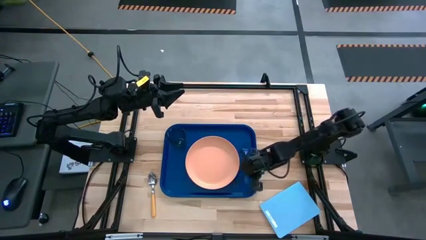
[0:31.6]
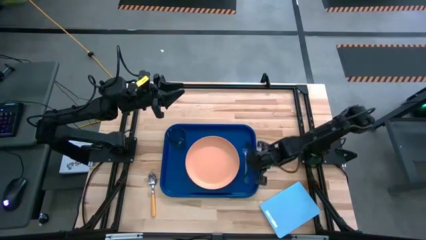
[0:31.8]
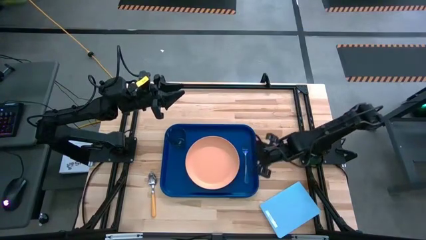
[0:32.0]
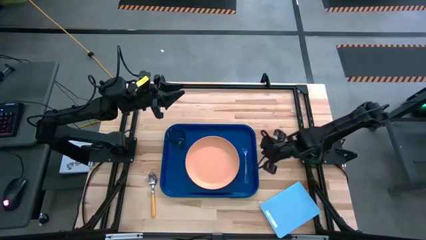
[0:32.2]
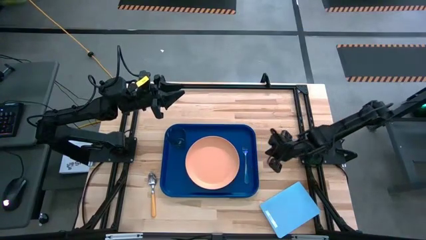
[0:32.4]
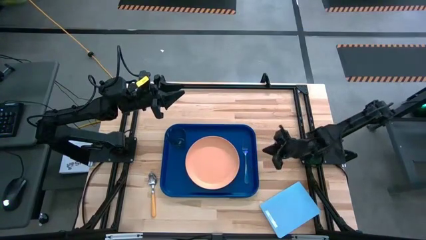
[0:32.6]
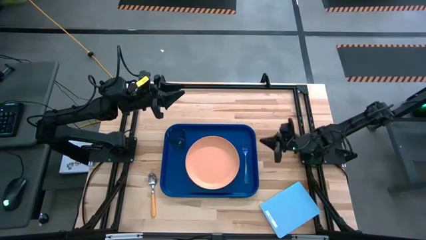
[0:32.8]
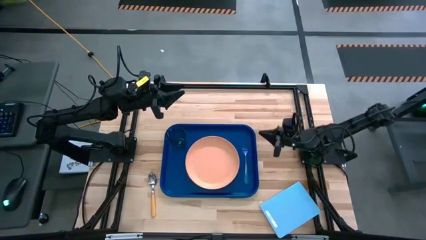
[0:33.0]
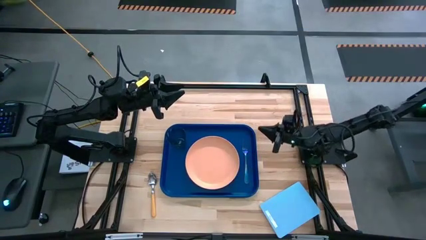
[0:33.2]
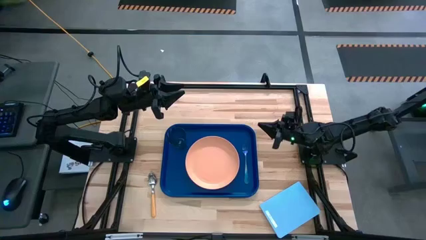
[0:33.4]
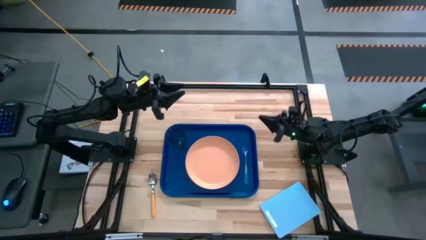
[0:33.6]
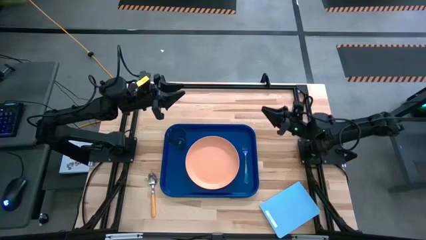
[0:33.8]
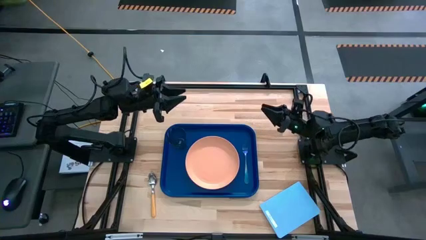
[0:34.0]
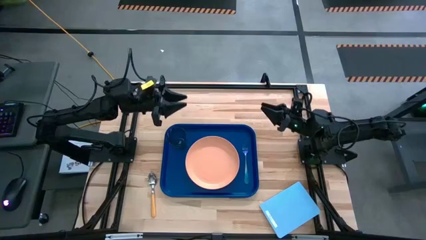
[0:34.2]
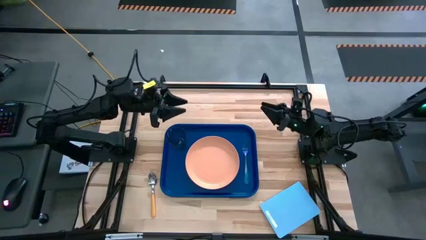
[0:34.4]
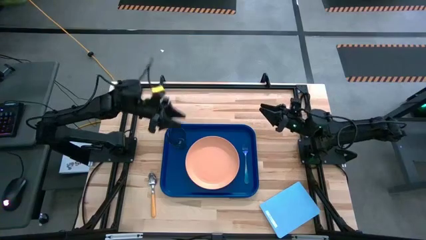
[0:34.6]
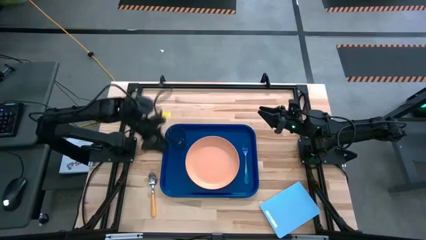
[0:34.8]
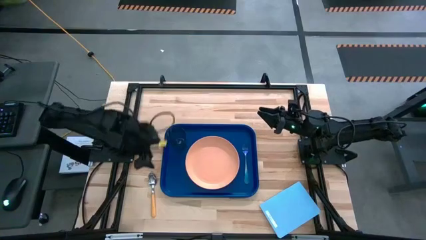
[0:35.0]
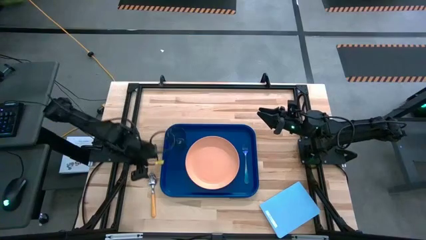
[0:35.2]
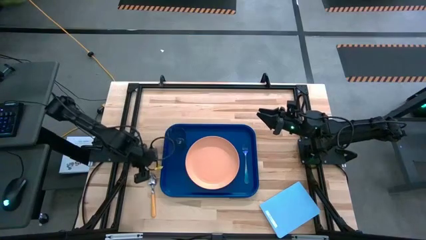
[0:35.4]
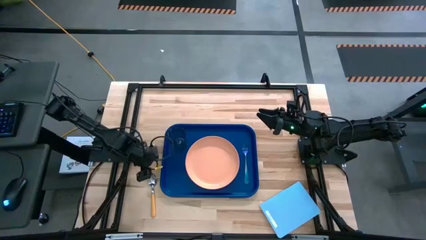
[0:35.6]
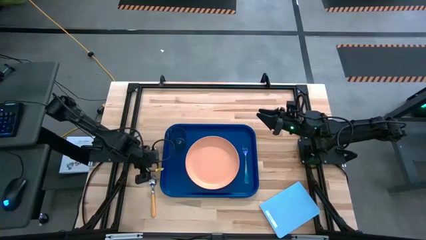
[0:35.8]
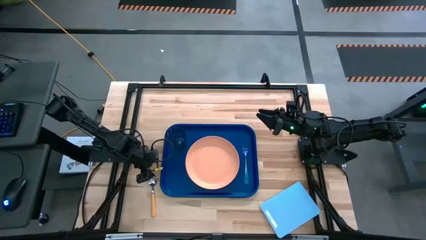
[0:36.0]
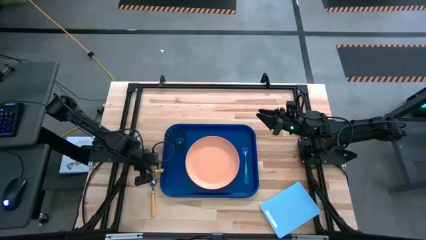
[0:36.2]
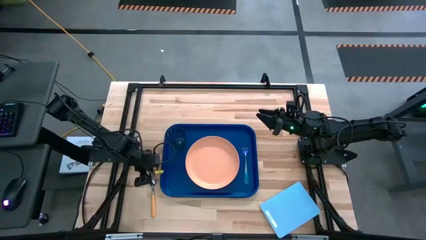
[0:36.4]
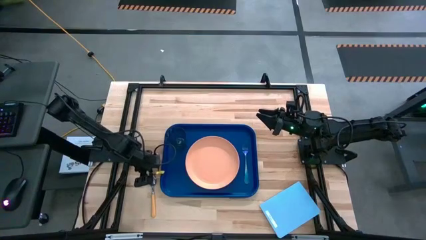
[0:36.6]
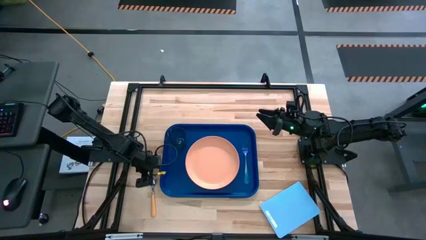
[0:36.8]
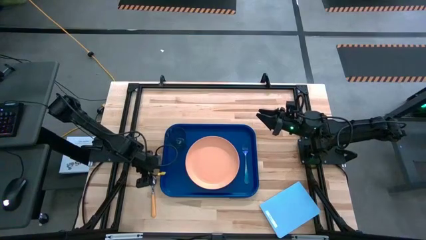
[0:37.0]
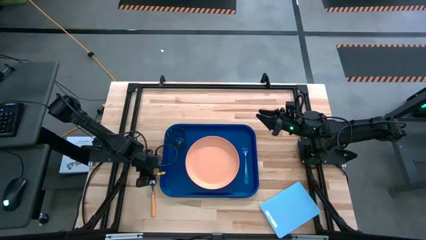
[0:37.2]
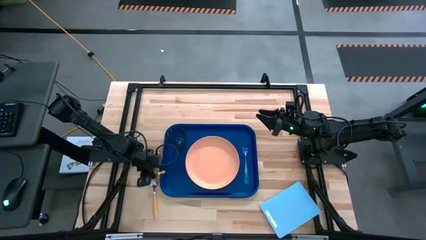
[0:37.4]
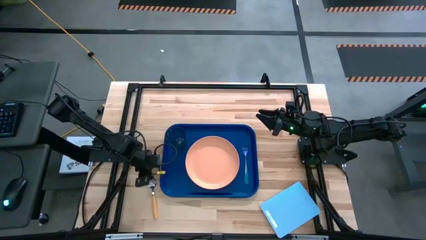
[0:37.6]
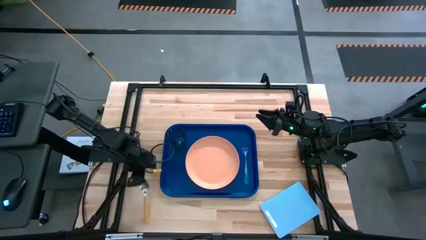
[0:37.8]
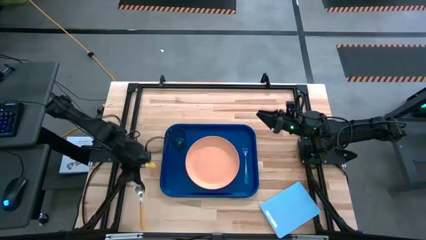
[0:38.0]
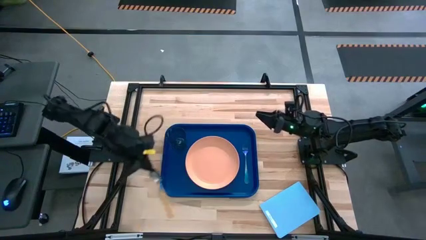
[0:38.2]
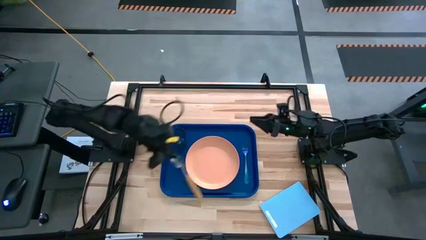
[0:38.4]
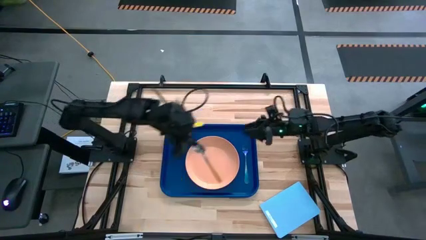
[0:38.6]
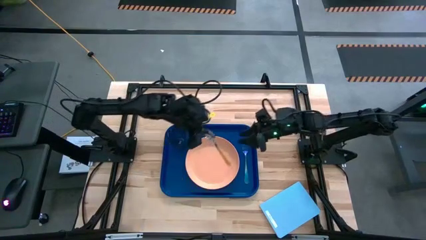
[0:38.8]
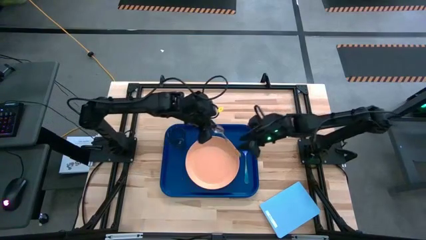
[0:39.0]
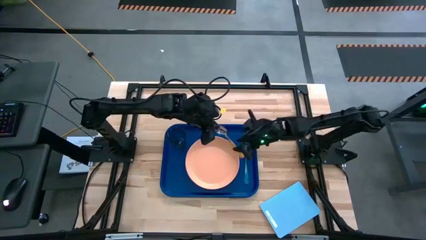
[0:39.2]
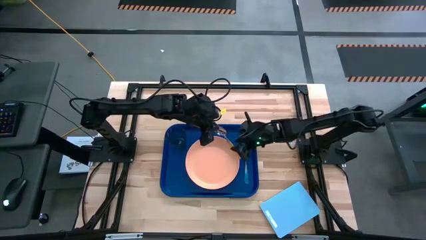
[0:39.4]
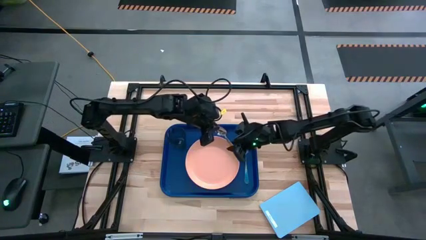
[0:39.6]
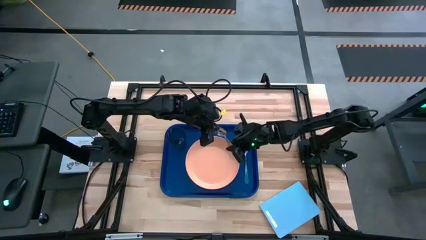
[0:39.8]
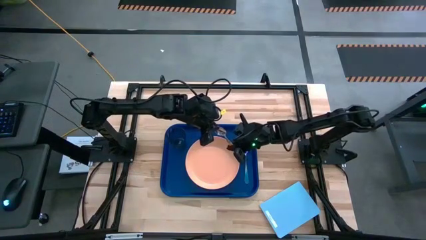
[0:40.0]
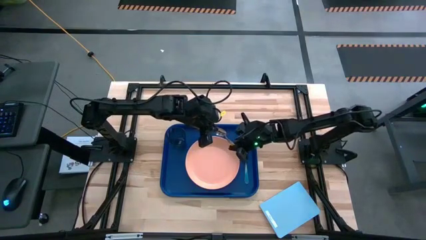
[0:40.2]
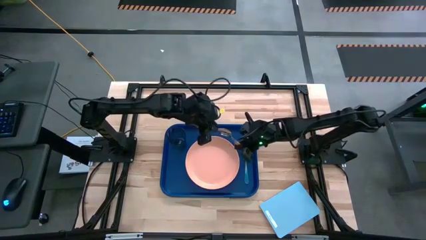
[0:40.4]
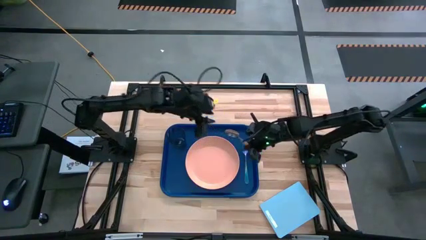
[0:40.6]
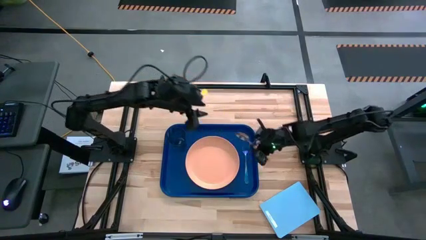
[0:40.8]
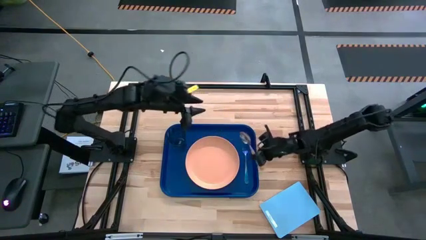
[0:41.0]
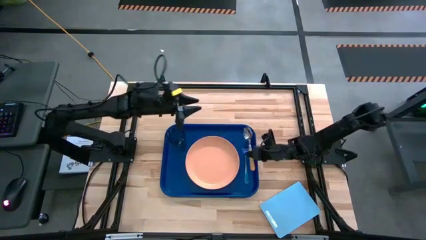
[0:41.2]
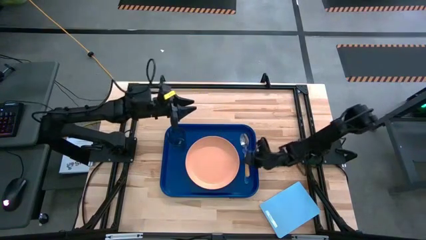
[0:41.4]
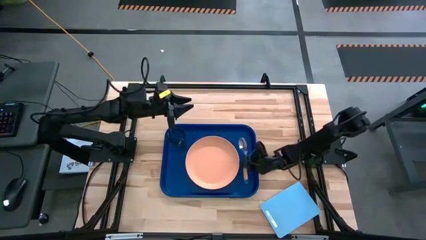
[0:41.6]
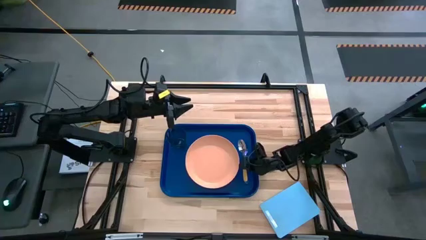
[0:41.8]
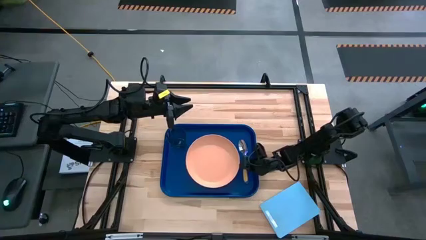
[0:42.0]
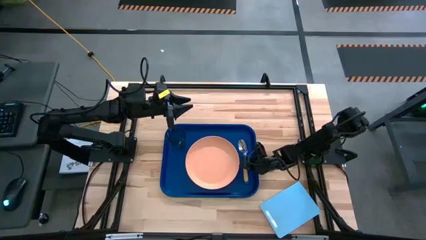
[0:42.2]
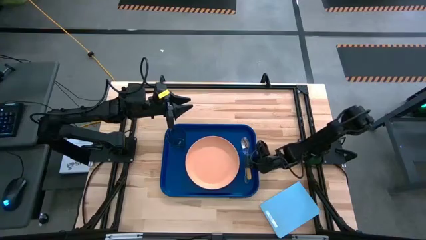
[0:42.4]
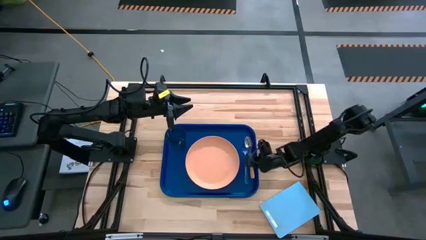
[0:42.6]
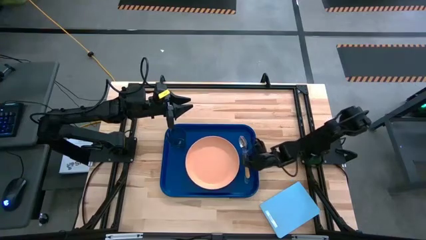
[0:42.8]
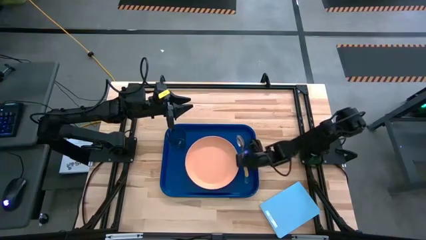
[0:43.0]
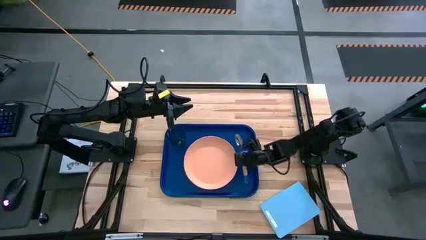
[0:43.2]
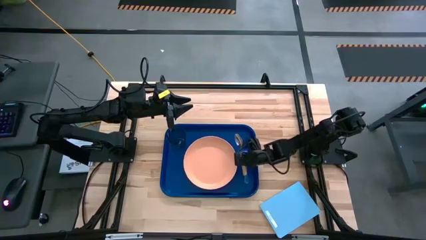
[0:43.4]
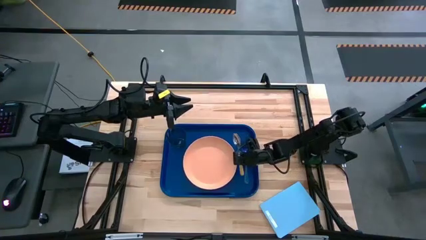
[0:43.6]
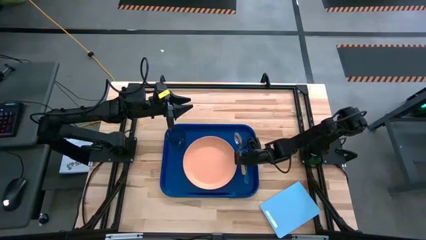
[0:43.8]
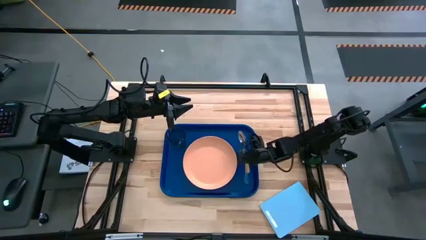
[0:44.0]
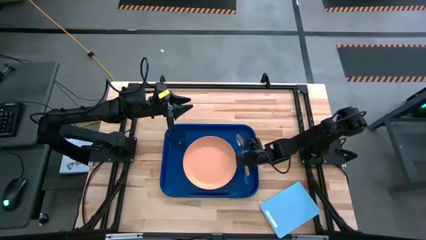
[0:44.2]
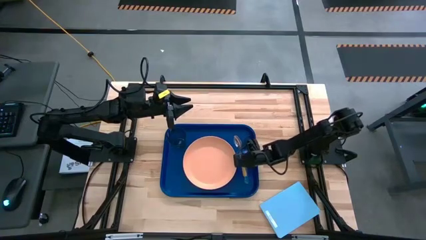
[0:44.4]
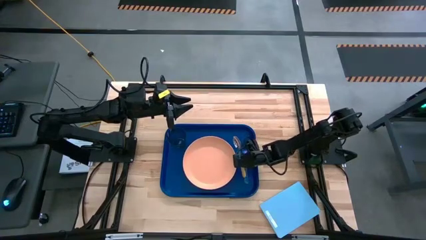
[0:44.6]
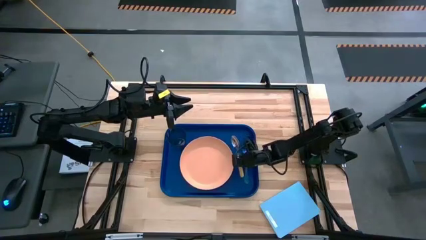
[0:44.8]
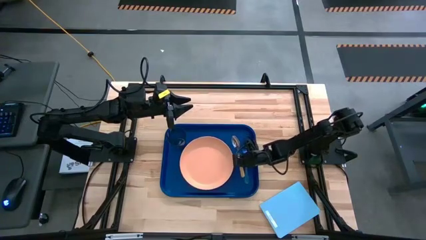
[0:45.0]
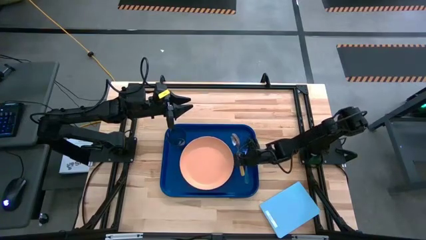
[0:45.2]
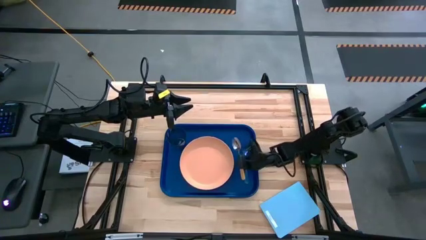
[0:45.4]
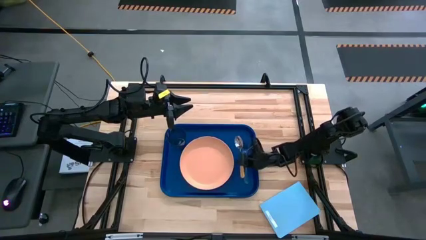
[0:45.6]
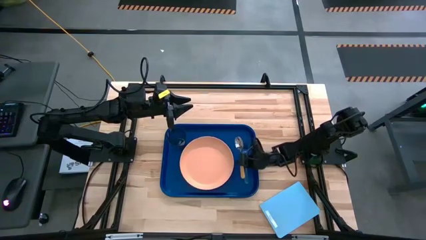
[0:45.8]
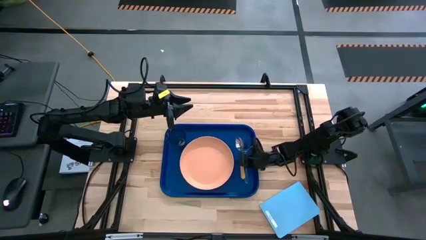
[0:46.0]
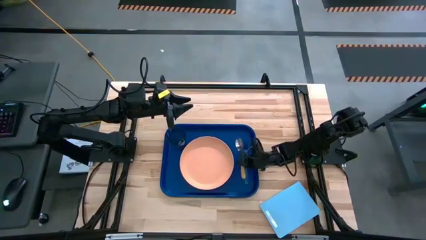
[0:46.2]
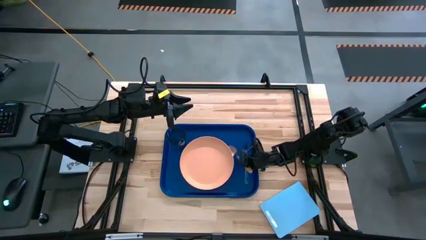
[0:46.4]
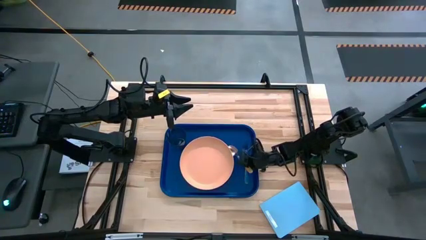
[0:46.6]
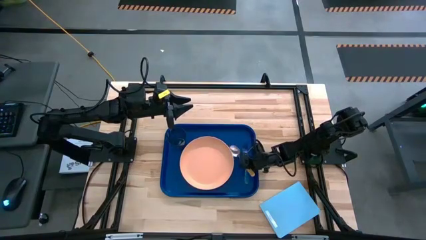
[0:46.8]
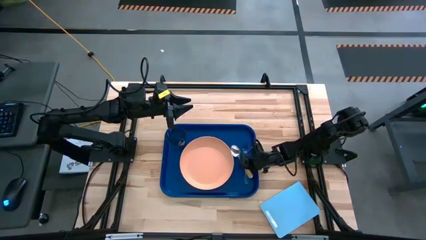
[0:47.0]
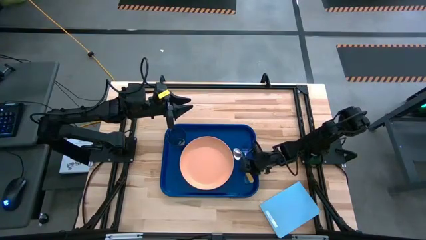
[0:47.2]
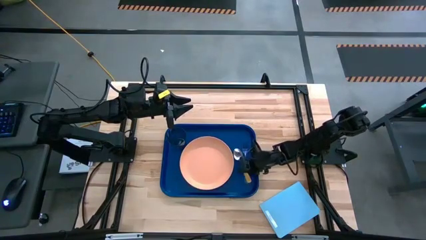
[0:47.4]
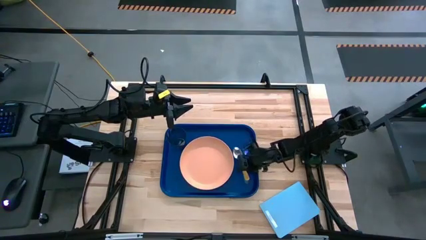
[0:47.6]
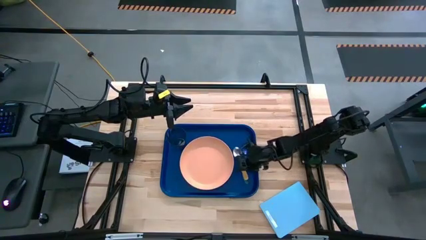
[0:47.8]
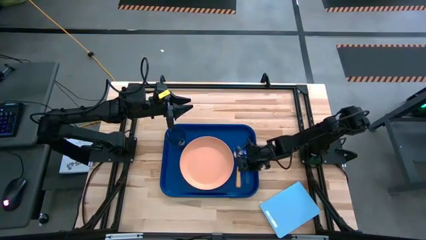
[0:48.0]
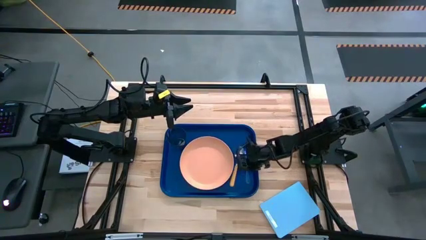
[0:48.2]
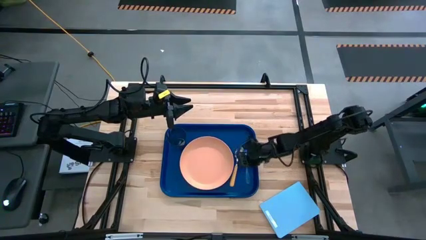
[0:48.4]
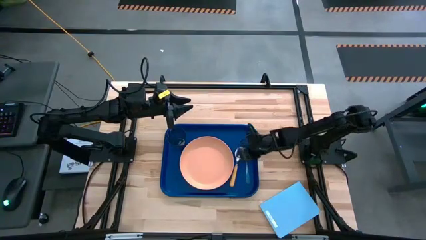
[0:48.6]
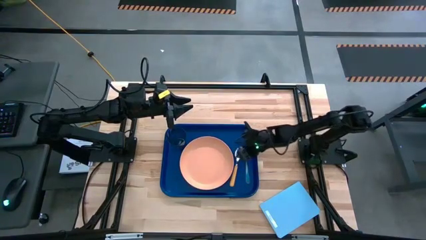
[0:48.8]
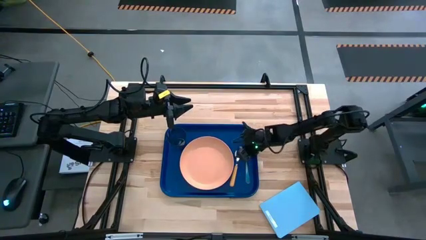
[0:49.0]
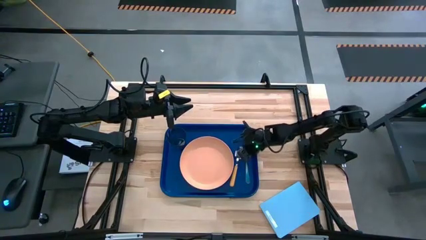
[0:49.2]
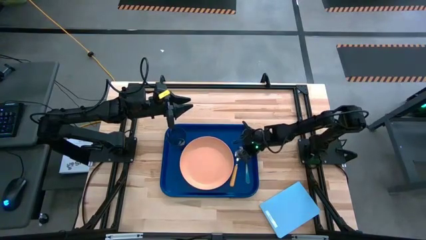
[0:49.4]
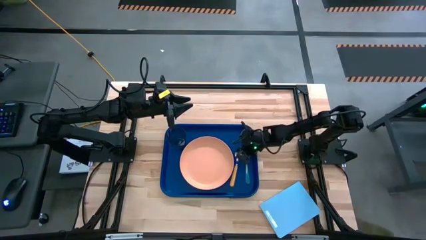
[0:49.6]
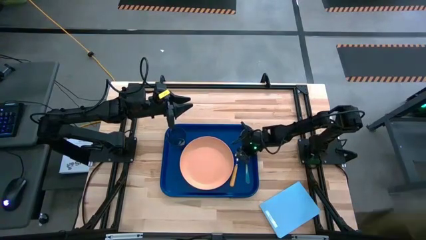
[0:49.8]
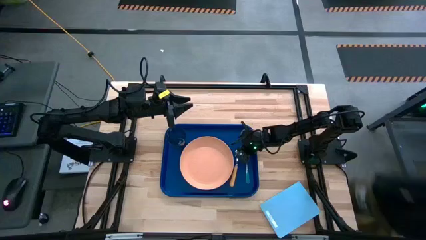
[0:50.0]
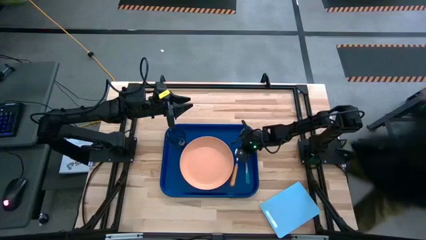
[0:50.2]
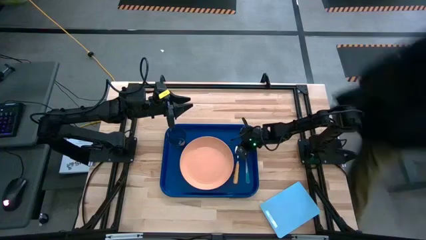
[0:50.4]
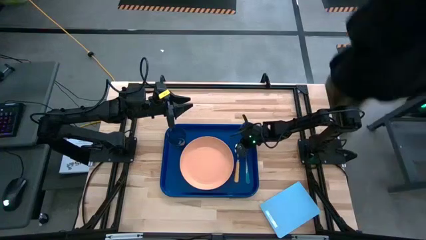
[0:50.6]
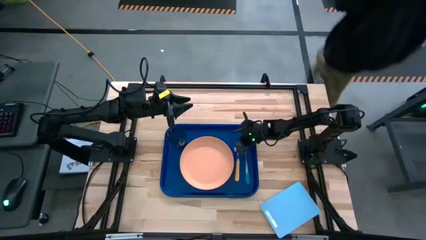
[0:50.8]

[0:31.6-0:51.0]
Task: Pick and place plate/cup/fork/spoon on tray
Put the orange spoon on the blue serving tray to the left of the blue fork
